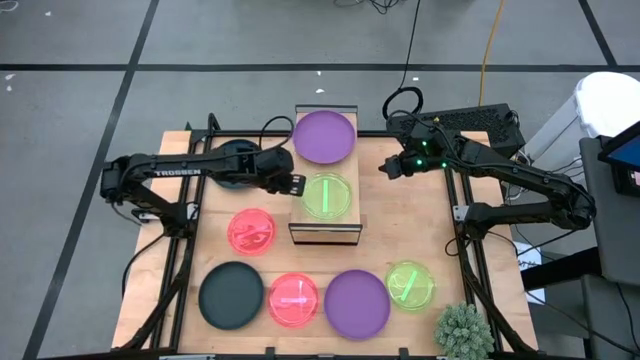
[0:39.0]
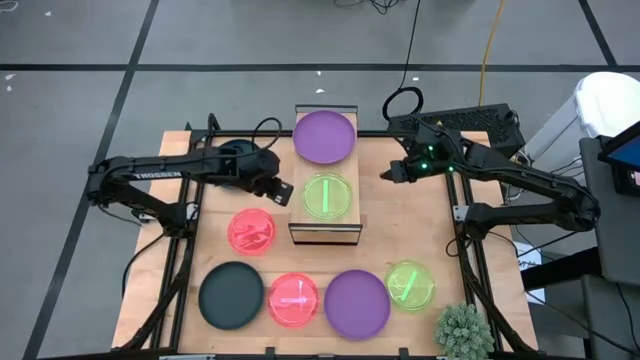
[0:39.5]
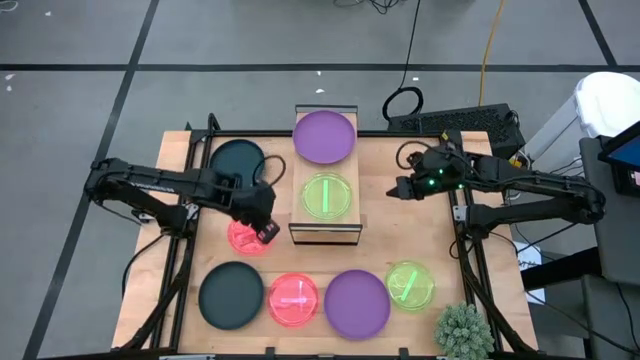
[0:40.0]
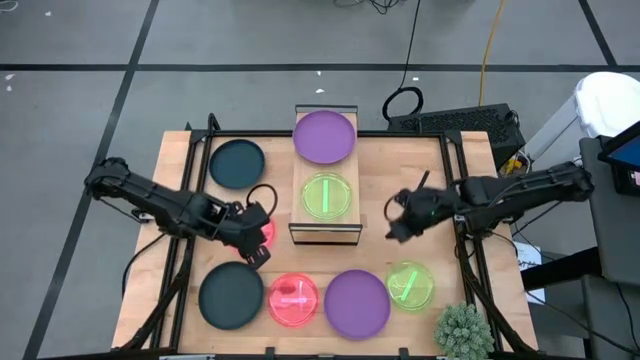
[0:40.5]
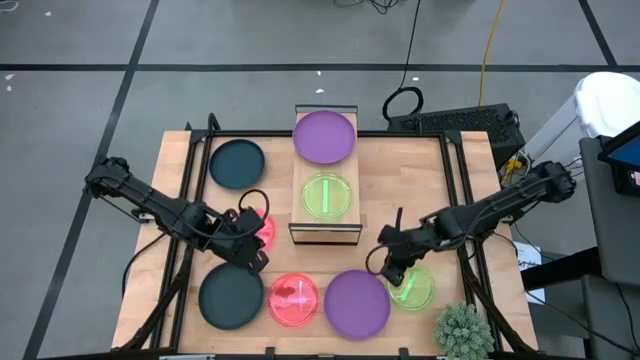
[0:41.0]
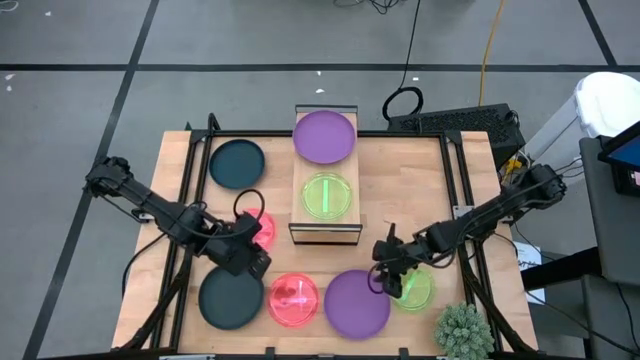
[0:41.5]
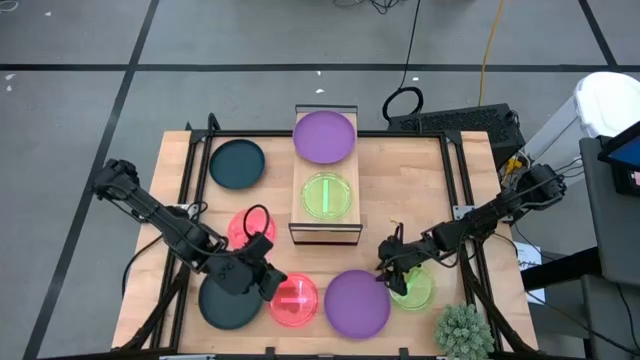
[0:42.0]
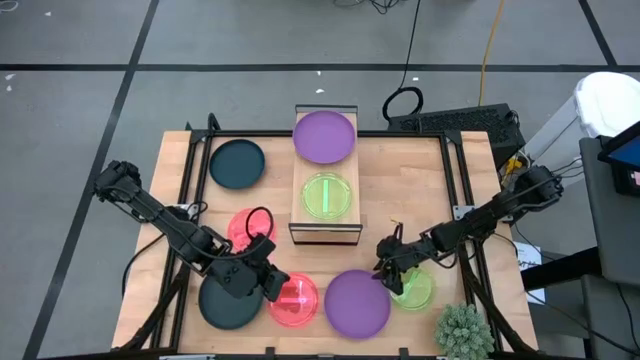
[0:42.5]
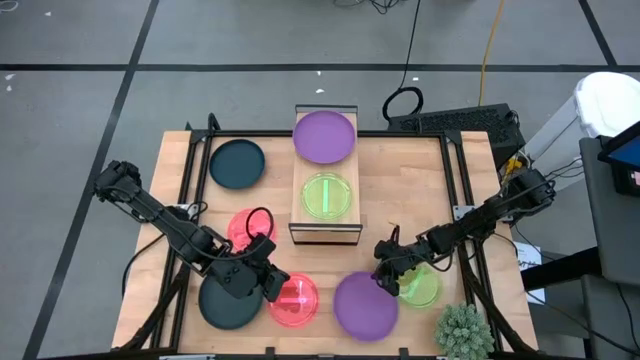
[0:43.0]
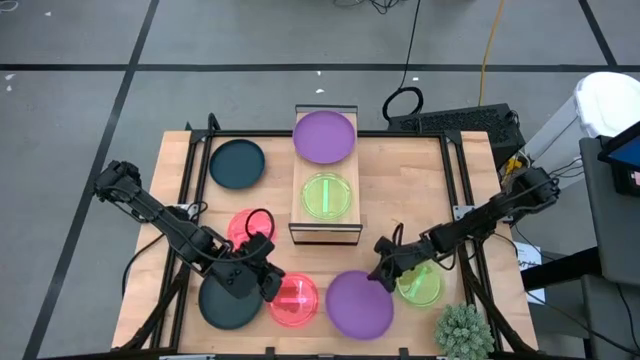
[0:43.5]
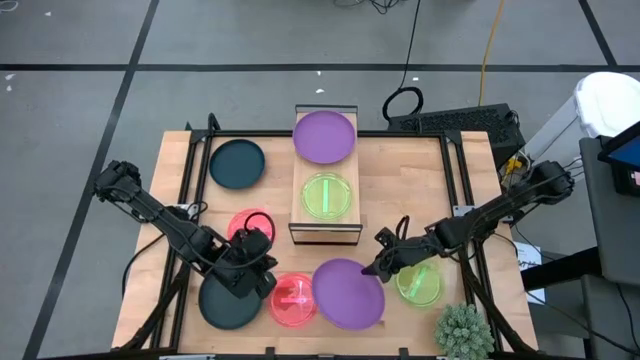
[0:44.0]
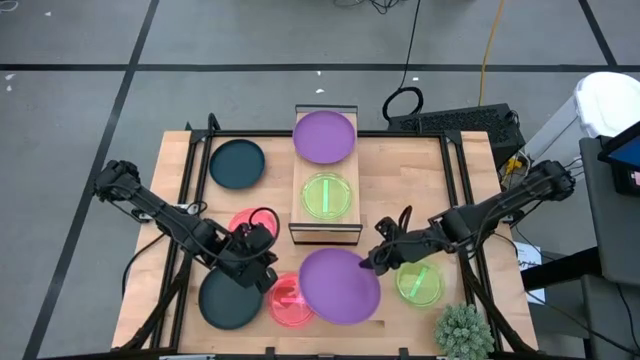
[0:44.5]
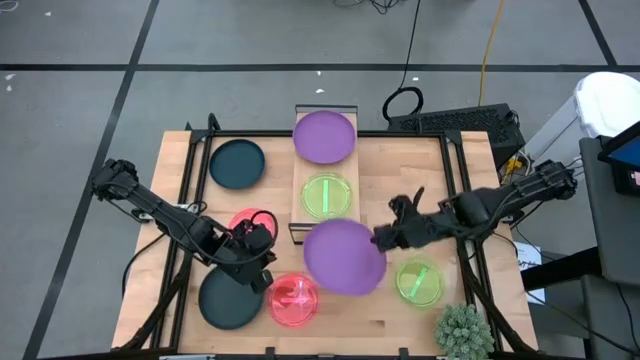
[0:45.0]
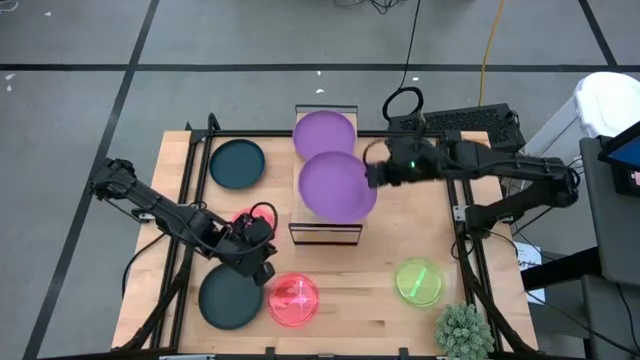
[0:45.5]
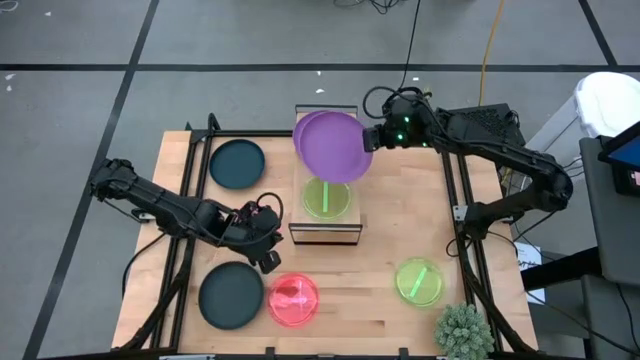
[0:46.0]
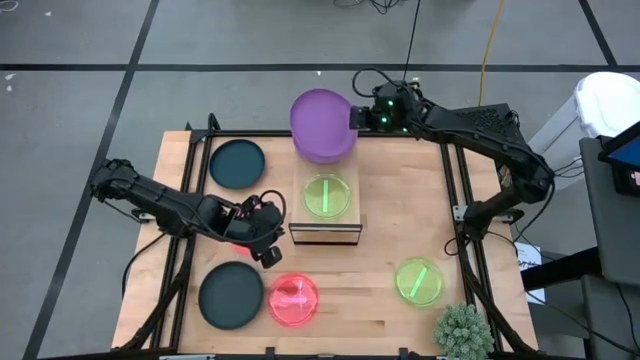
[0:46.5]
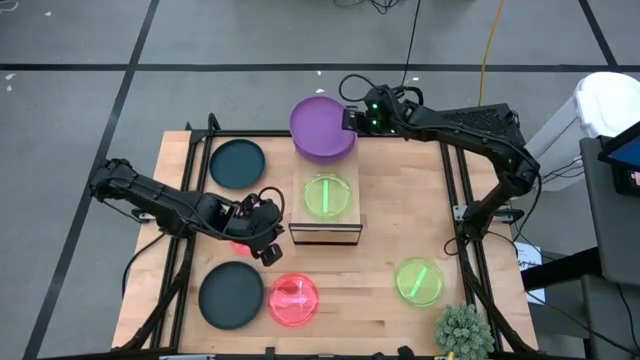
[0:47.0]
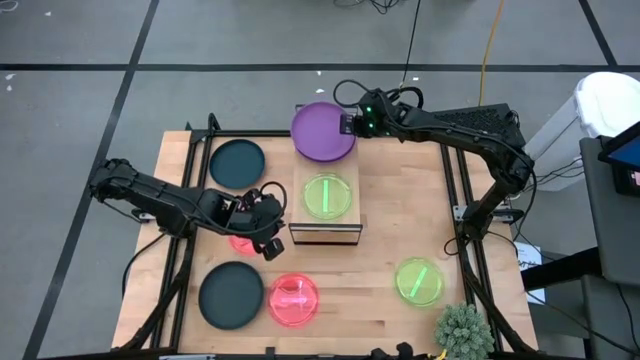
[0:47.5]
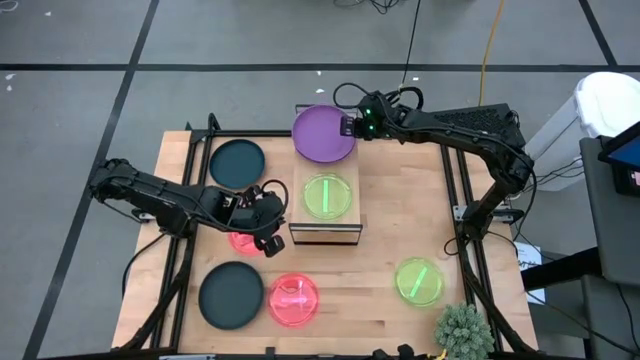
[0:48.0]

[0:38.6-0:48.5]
Task: Place and stack plates onto a shelf
Stack the purple plate on top of the other purple plate on the shelf

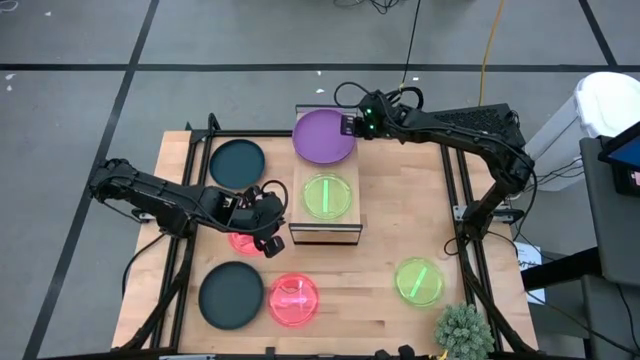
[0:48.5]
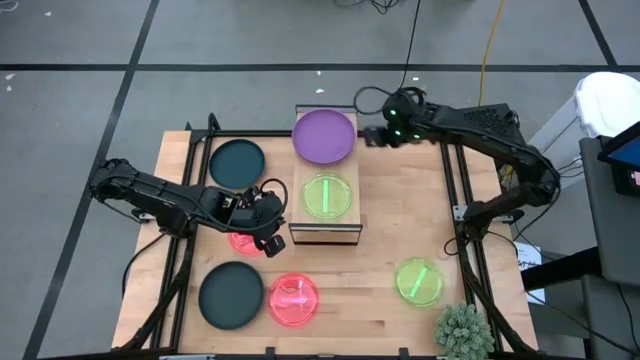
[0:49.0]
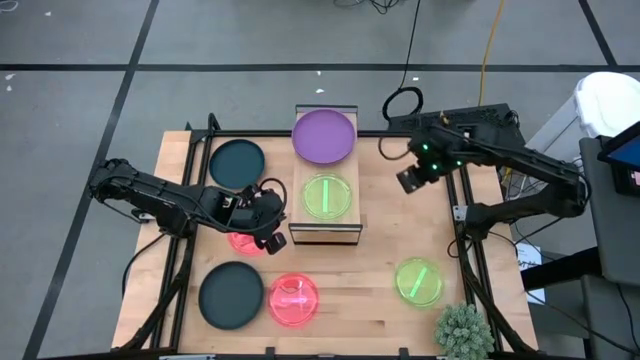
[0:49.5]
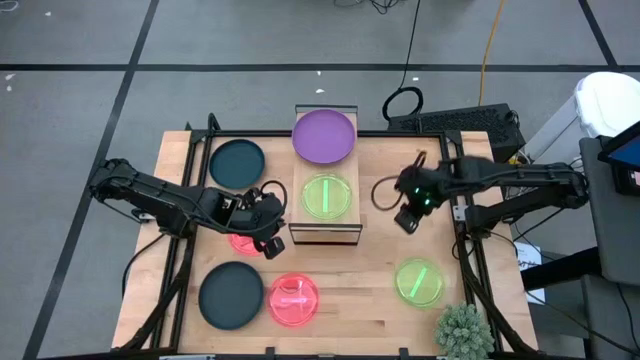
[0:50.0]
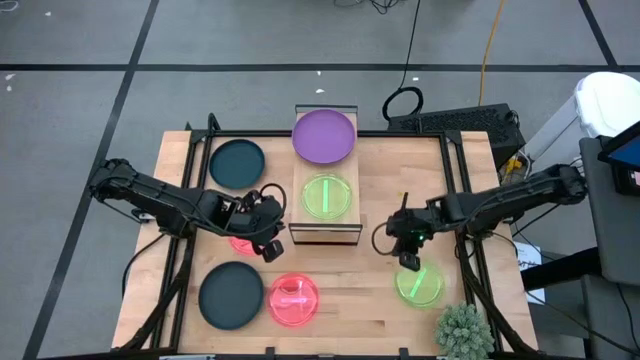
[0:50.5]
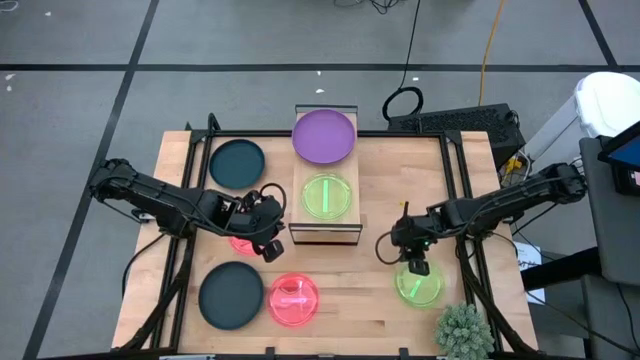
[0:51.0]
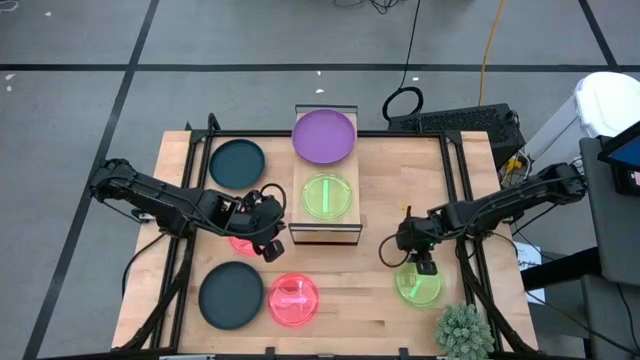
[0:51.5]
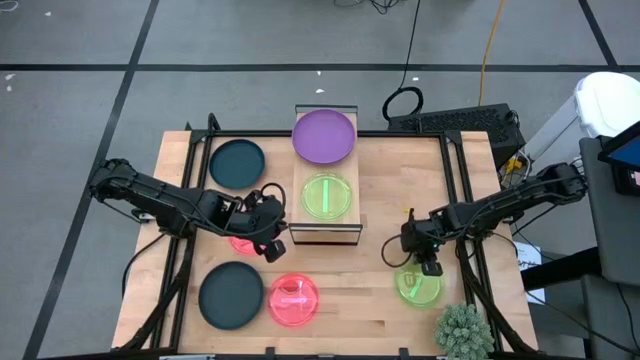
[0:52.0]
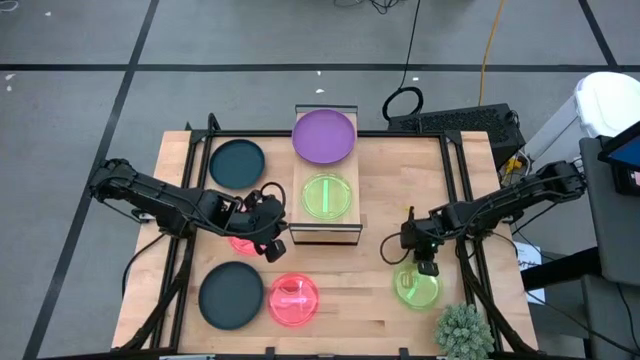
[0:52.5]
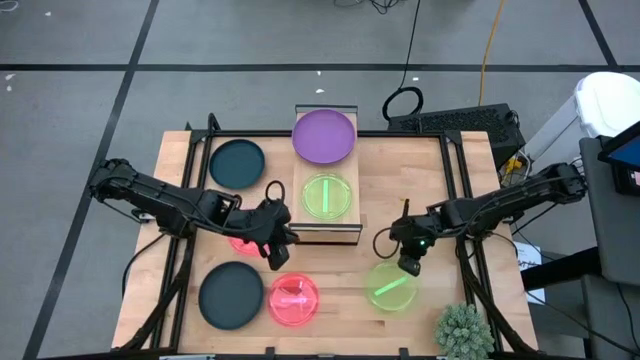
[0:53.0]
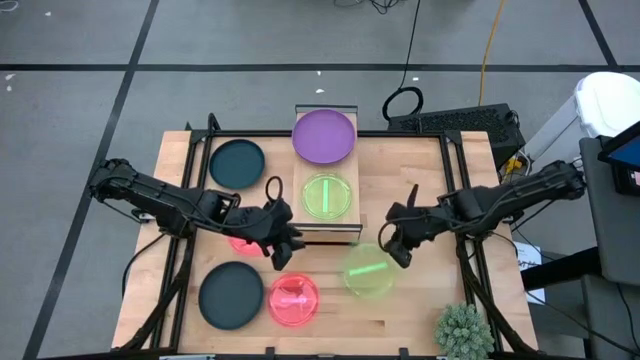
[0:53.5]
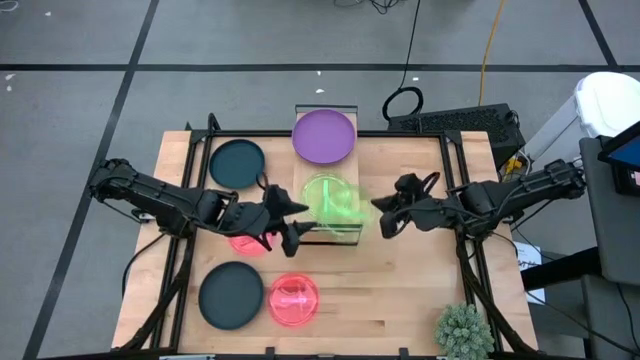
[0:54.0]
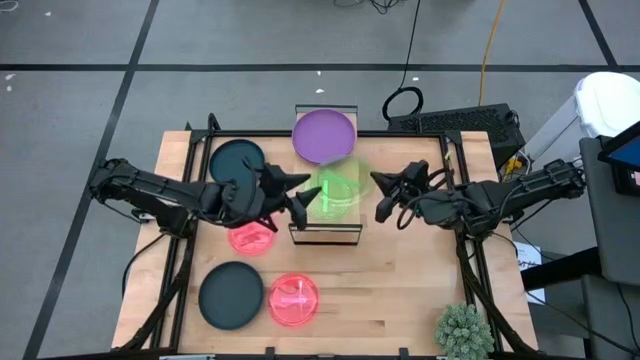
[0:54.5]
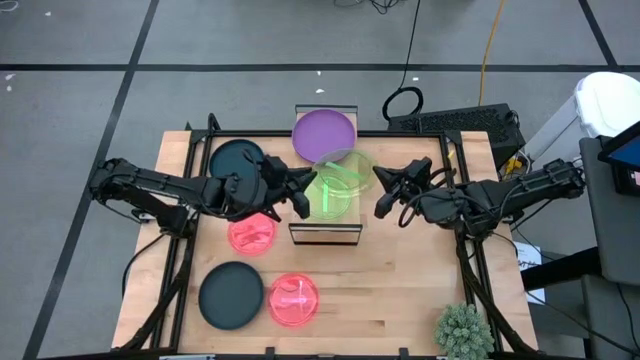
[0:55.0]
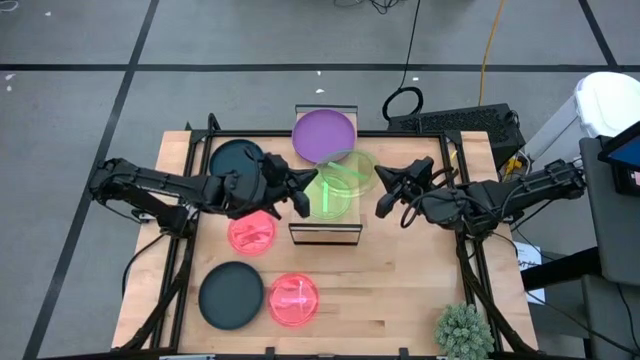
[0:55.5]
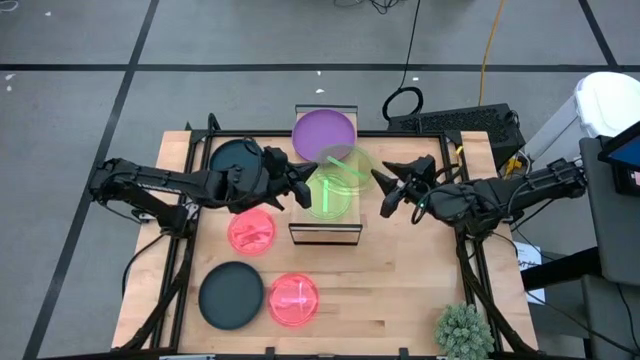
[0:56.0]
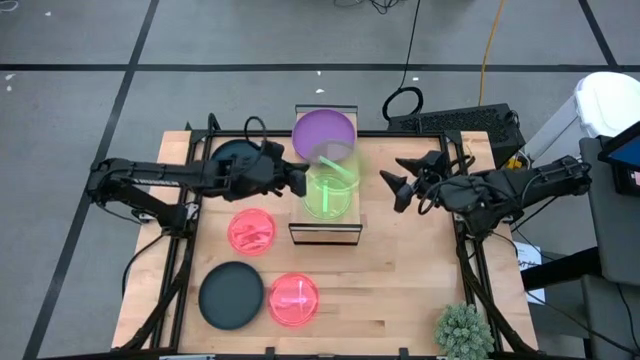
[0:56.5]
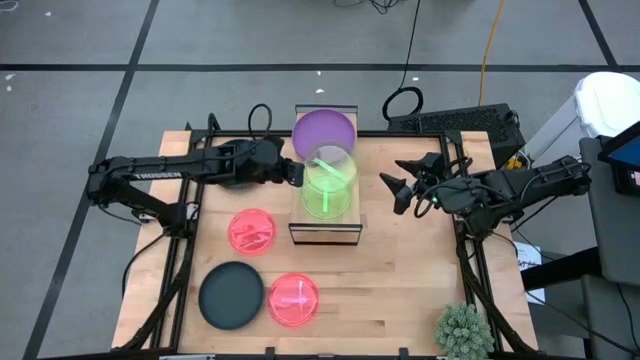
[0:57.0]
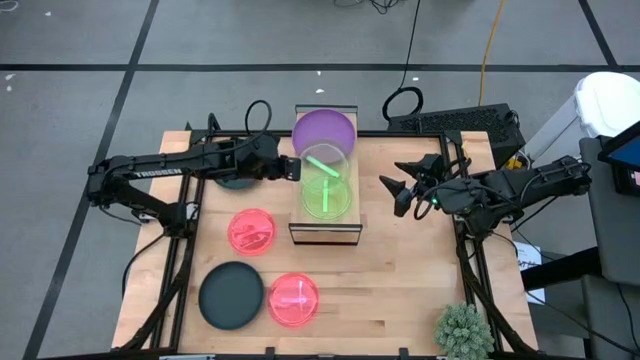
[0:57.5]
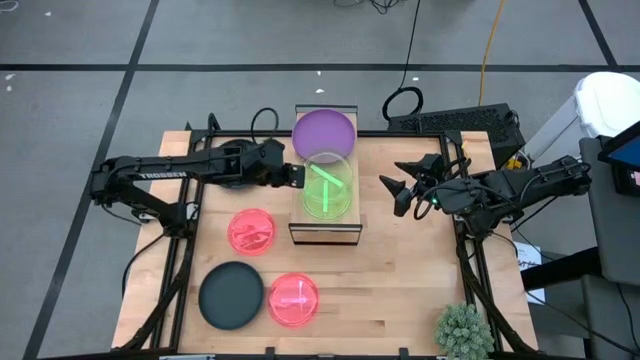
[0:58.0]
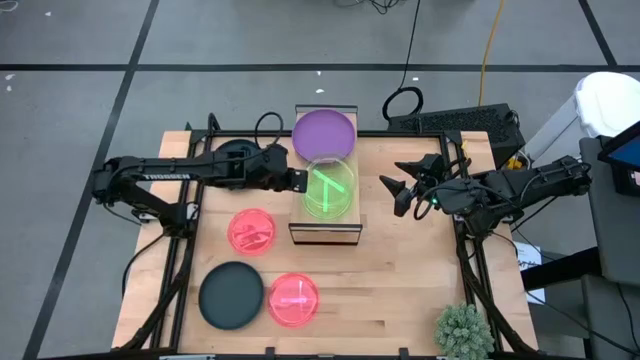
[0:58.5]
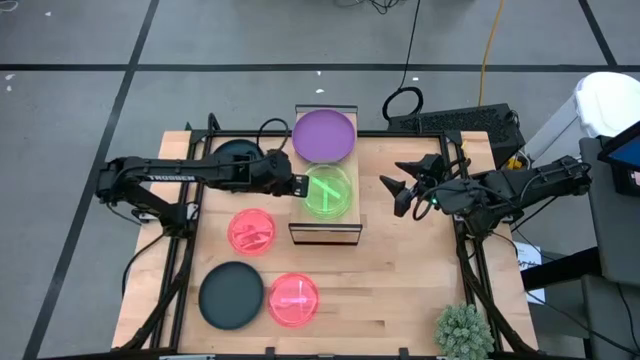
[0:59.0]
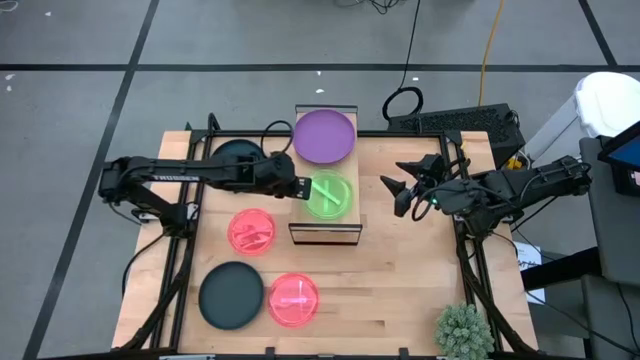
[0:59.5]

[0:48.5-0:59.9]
Stack the green plate on top of the other green plate on the shelf
